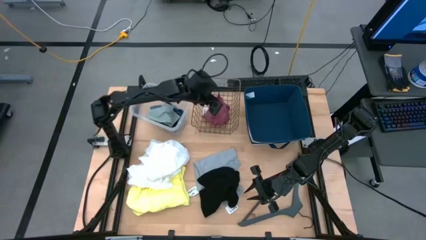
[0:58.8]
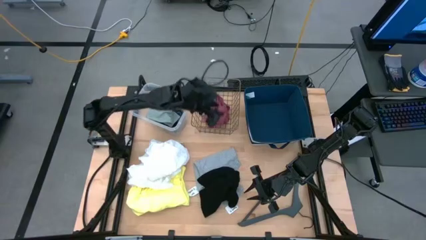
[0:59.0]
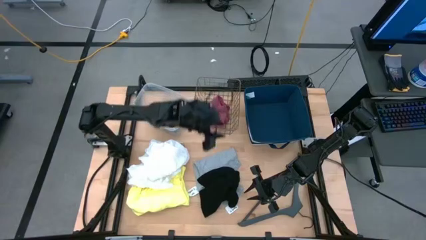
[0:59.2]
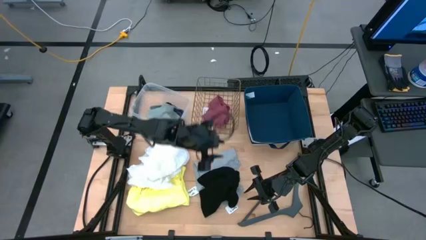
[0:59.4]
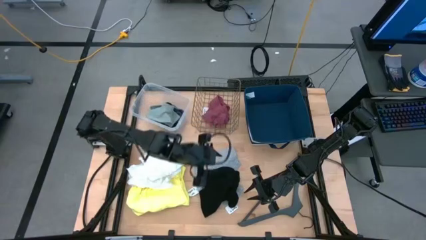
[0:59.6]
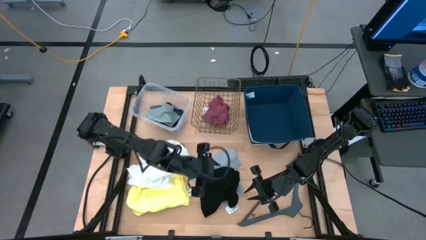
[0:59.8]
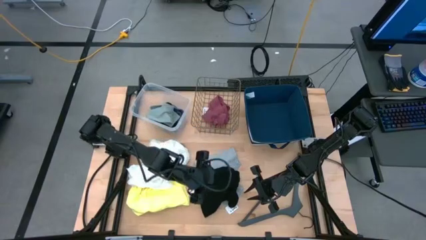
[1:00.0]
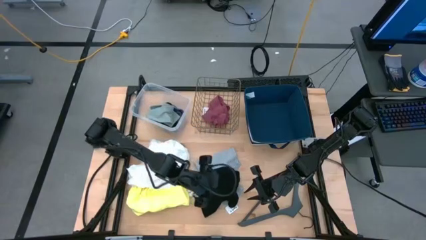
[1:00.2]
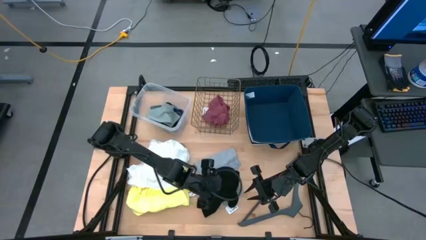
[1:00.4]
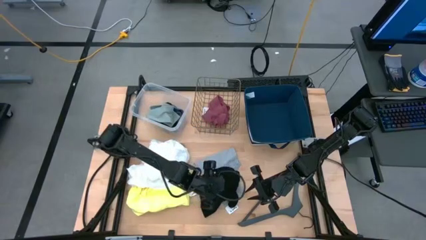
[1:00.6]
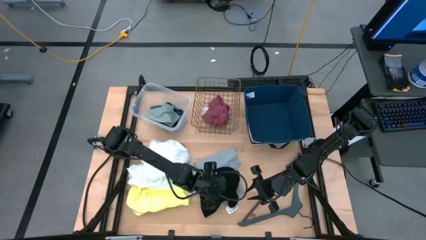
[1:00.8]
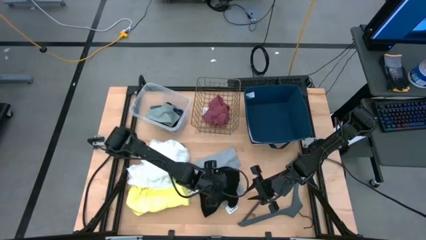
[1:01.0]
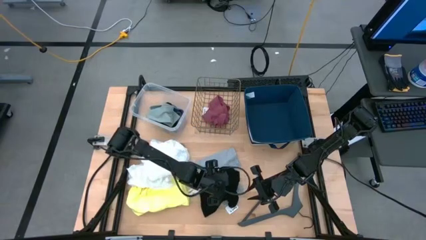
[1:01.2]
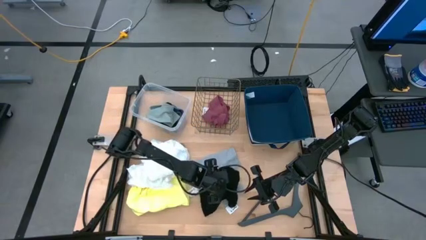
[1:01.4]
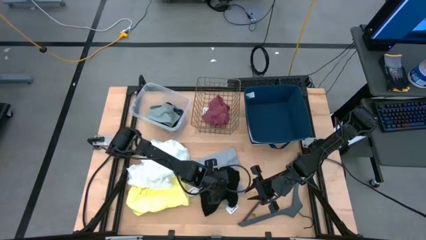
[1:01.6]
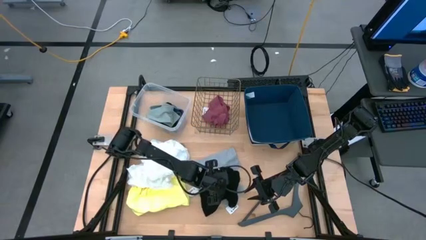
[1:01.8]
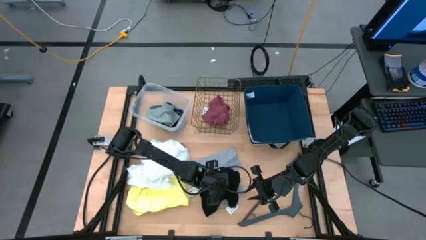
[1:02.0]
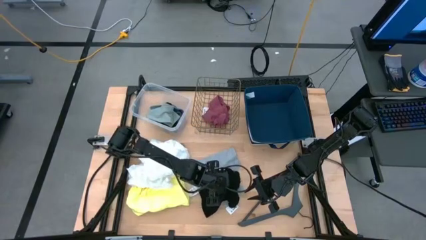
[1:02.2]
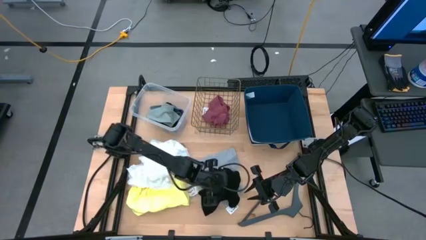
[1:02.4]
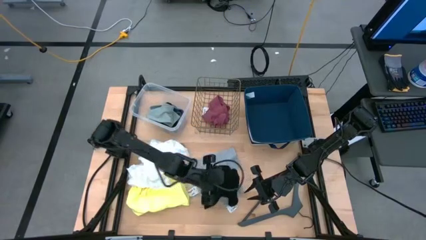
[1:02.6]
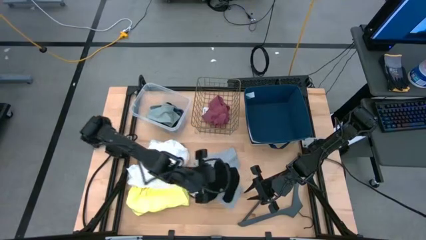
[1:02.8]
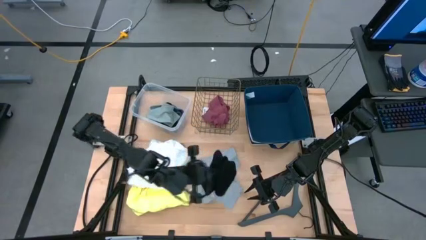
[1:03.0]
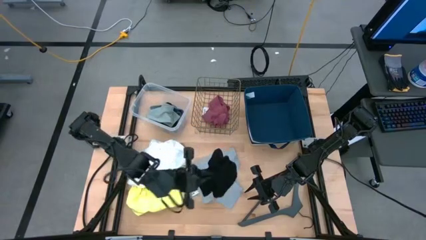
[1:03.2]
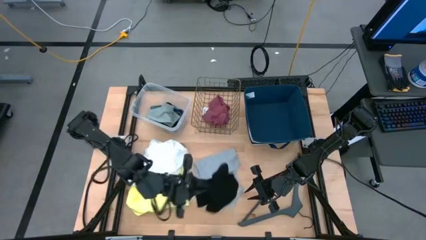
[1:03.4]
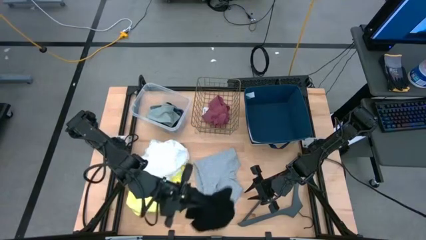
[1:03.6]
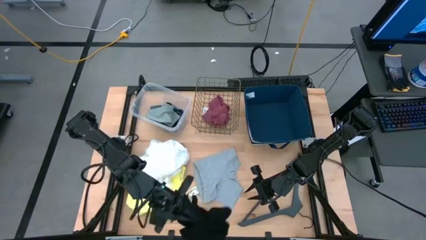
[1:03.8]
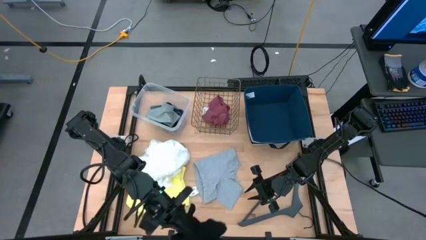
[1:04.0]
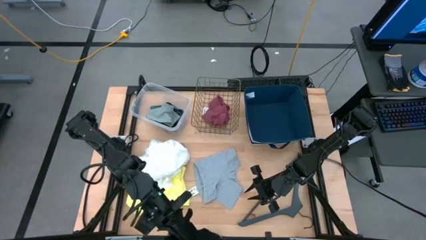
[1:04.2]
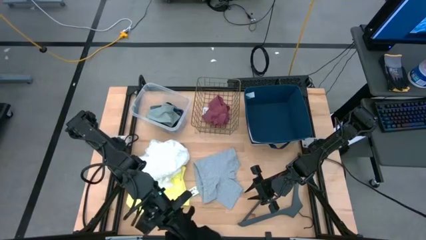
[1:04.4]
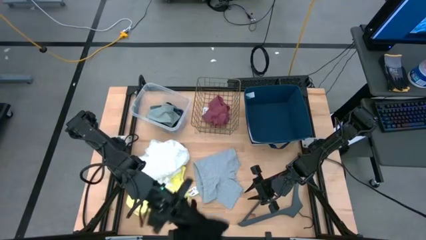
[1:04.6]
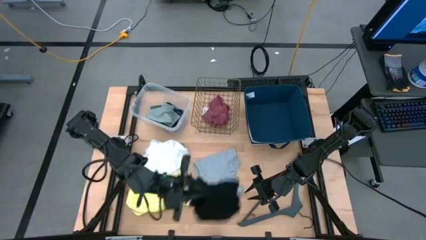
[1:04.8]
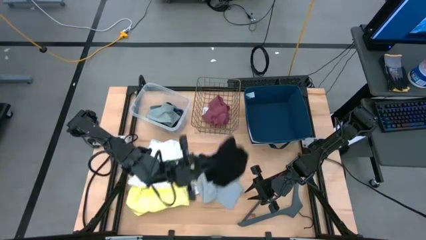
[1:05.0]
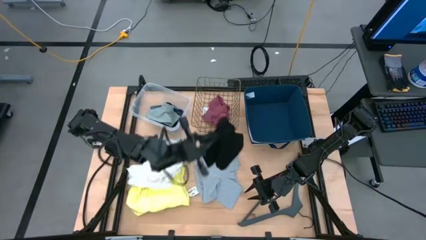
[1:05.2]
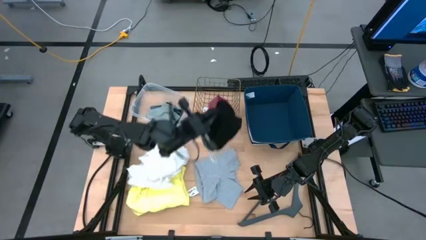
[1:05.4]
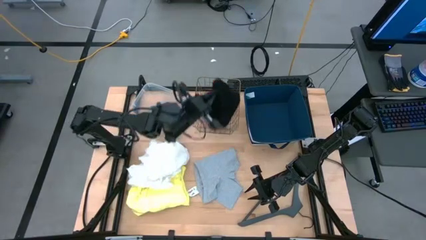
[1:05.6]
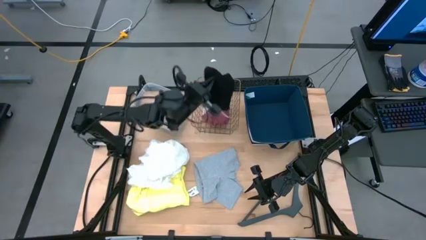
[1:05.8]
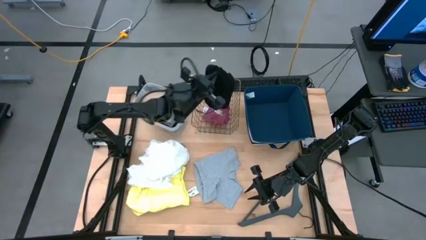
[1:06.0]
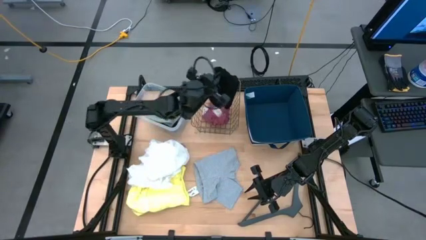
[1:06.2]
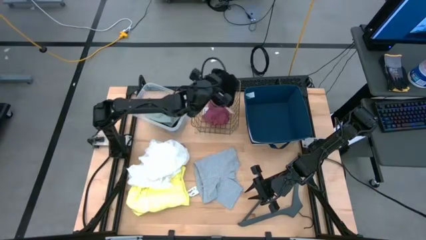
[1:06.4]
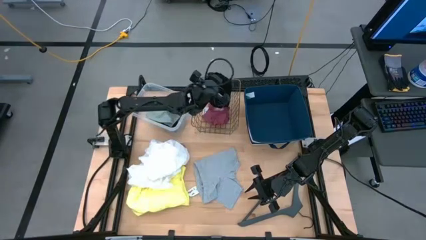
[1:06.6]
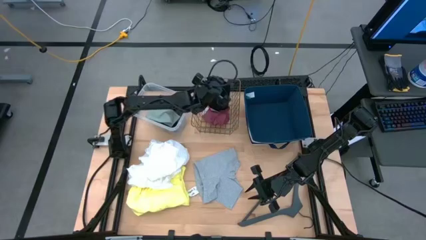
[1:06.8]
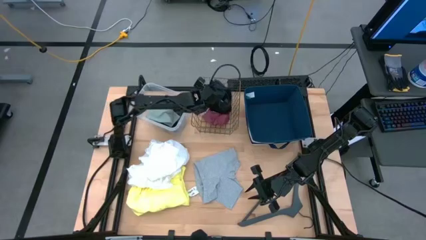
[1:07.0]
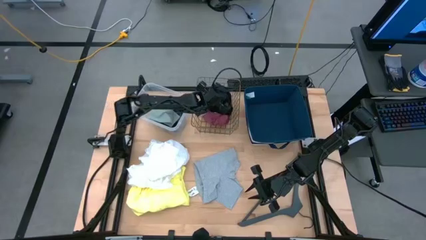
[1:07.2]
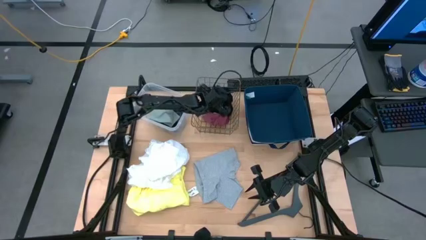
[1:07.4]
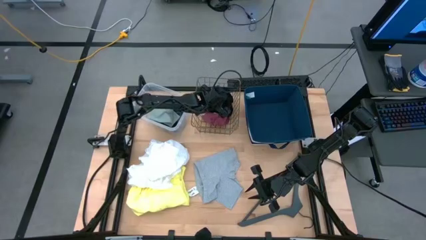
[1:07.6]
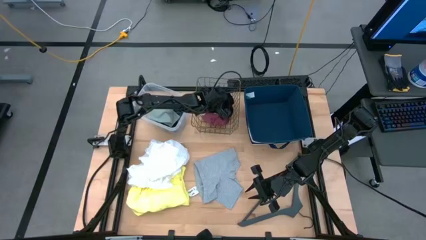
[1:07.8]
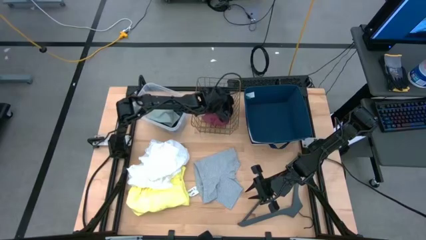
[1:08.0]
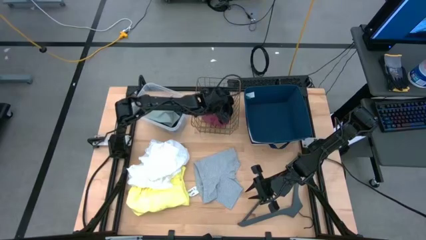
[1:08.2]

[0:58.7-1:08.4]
Task: Pick & Place Cloths
Put the black shorts into the mesh basket

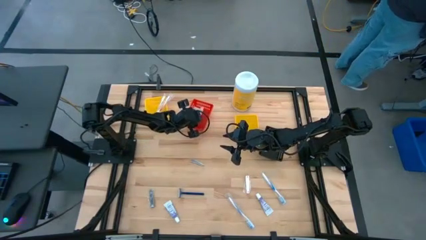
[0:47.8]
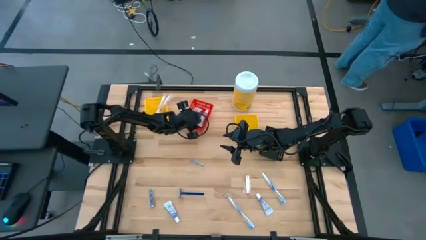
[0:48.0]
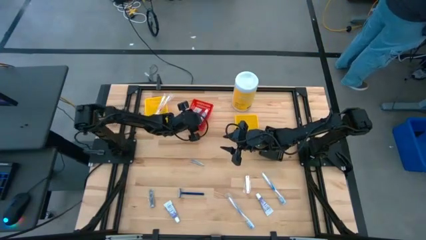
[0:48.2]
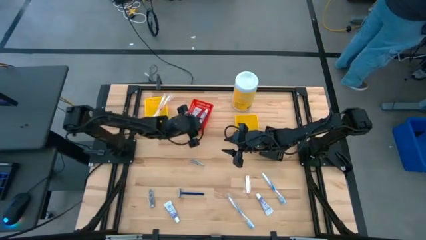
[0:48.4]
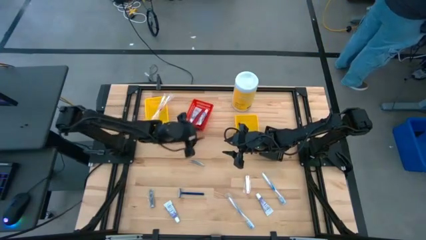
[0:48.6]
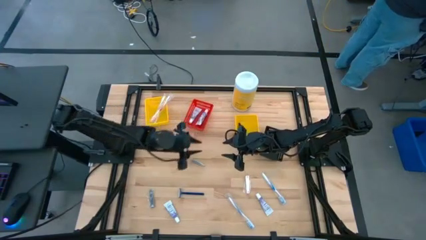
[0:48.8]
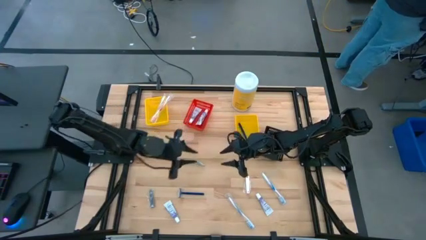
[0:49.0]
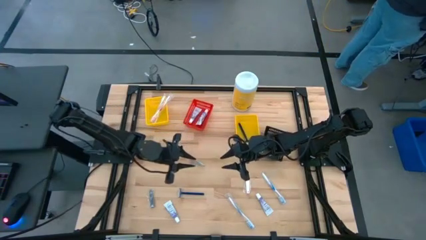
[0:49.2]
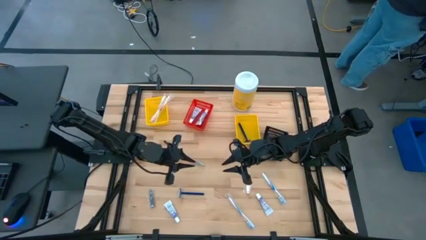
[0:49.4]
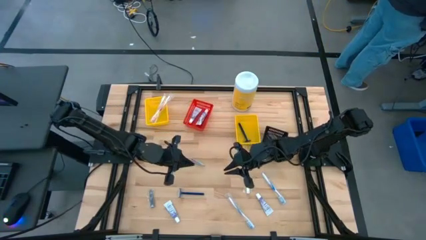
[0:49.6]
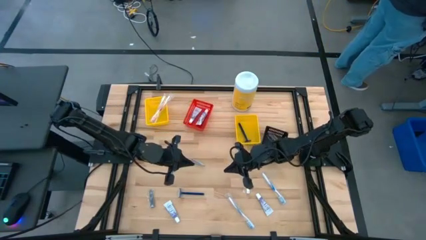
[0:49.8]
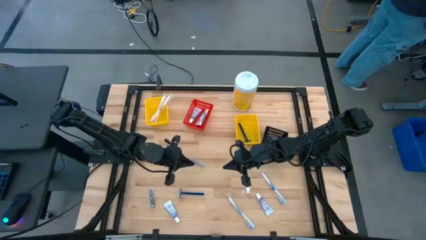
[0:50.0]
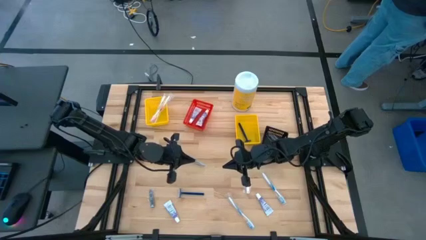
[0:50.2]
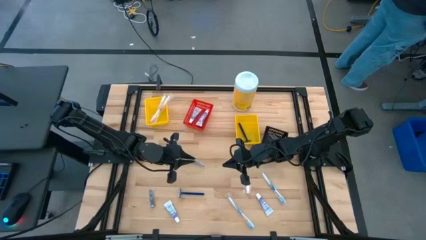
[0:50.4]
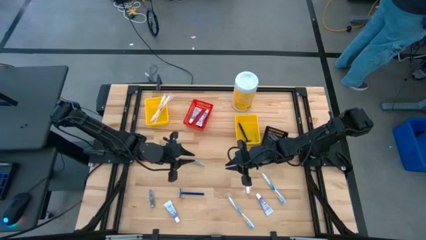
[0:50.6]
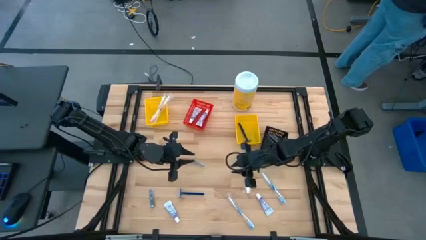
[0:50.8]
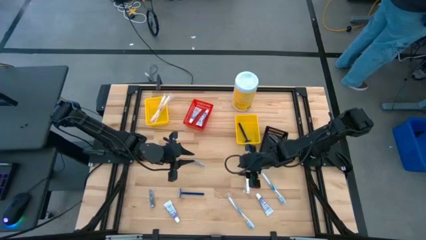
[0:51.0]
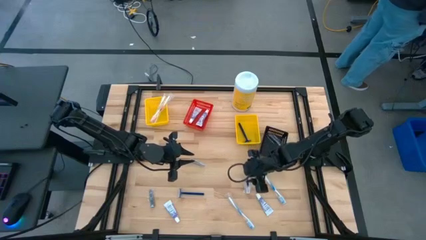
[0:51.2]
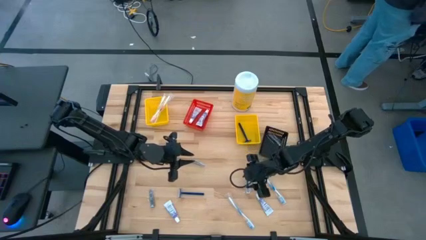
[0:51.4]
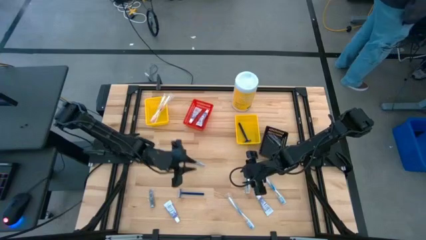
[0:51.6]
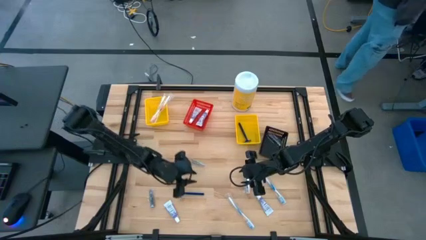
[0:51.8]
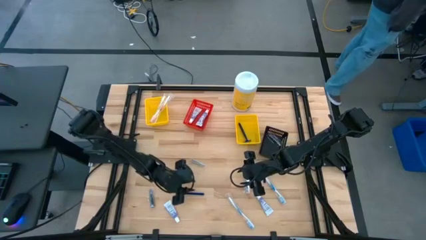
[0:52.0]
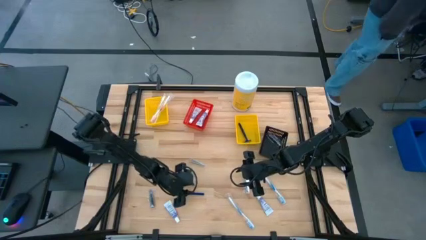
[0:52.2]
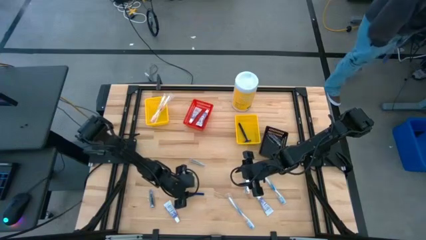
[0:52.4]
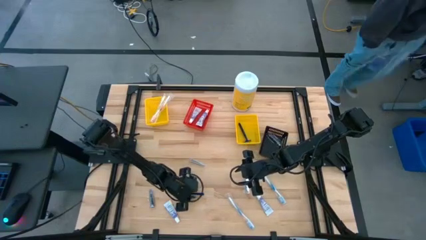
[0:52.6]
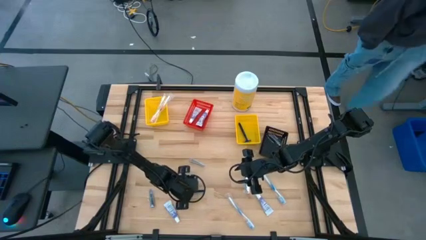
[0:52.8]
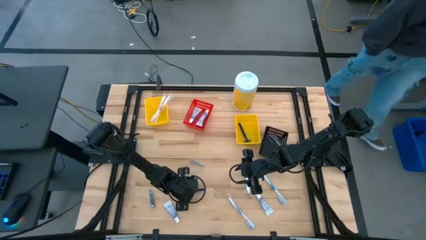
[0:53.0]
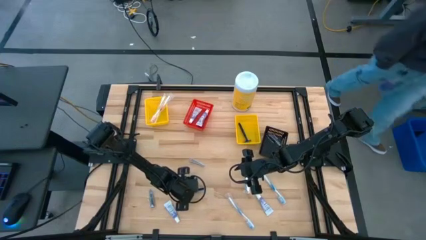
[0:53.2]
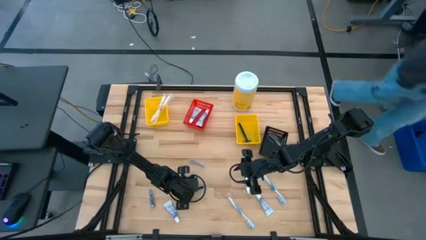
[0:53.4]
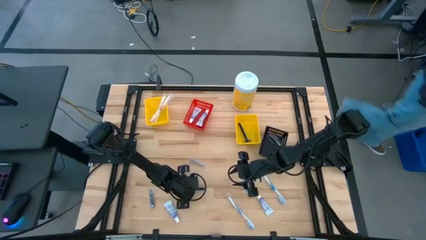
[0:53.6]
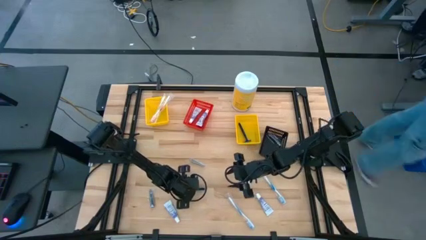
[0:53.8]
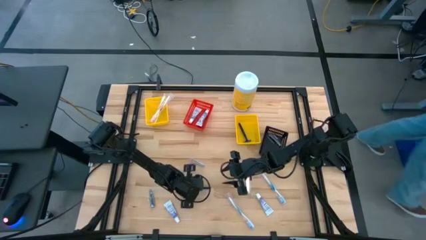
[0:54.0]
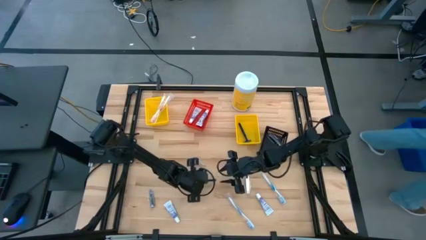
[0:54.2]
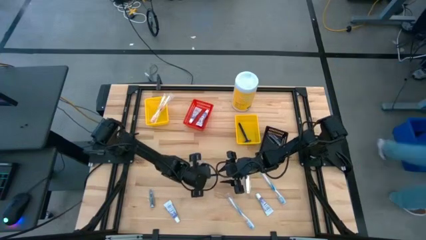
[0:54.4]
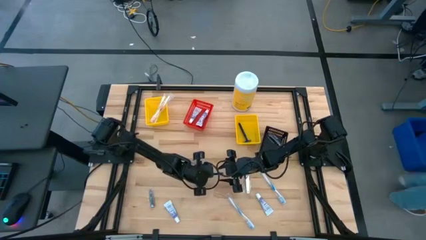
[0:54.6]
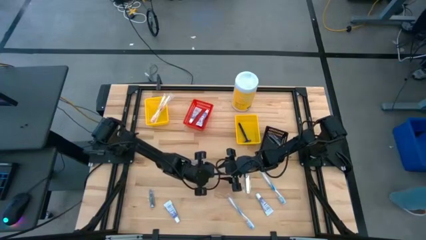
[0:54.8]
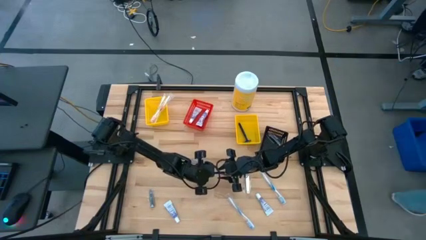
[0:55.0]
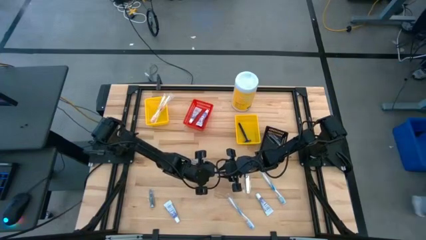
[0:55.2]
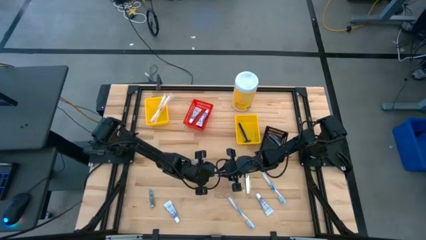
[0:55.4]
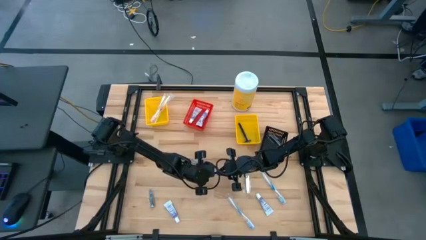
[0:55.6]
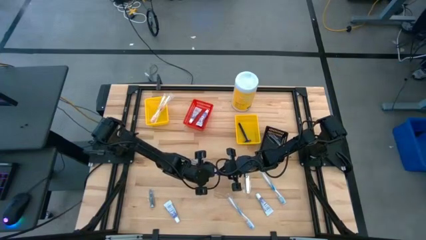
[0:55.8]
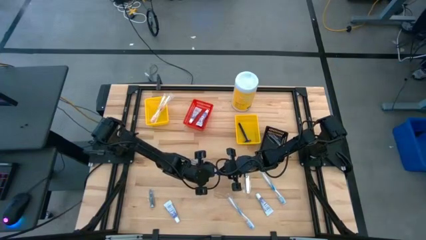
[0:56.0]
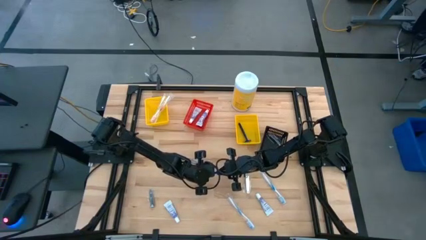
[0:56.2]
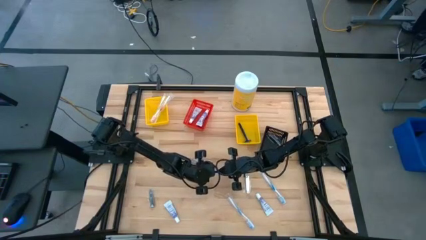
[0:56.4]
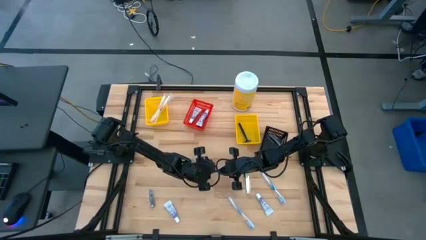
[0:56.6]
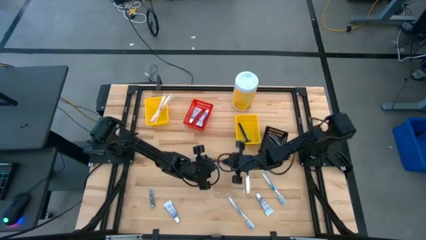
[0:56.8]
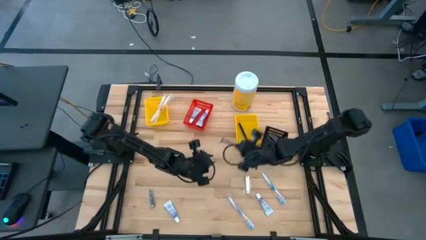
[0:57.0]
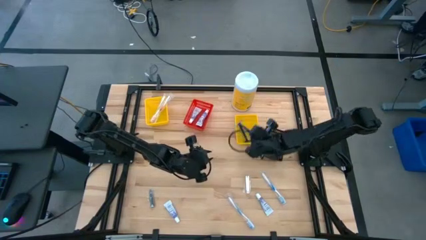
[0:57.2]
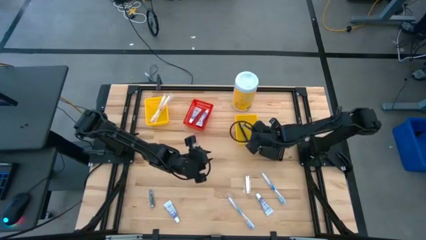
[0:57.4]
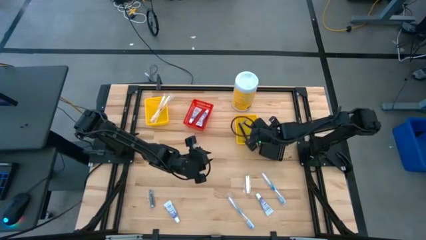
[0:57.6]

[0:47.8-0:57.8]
Task: Pick & Place Travel size toiletries
Put the blue razor into the yellow basket
